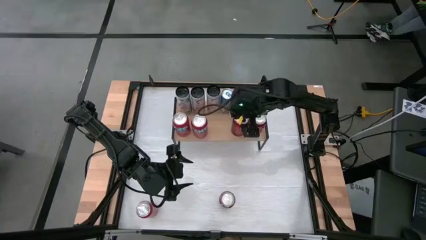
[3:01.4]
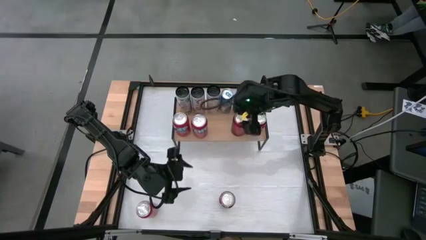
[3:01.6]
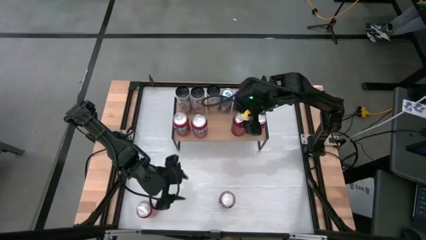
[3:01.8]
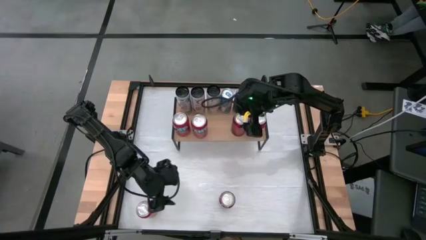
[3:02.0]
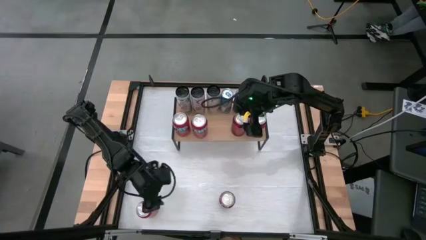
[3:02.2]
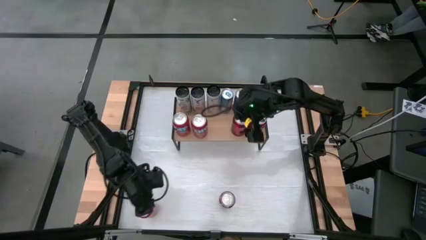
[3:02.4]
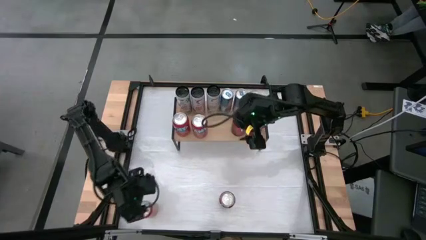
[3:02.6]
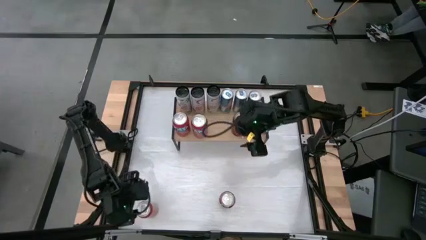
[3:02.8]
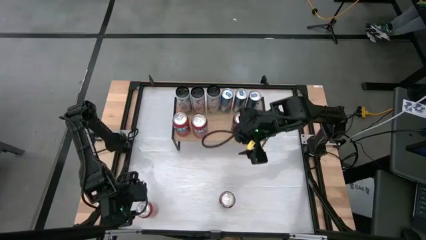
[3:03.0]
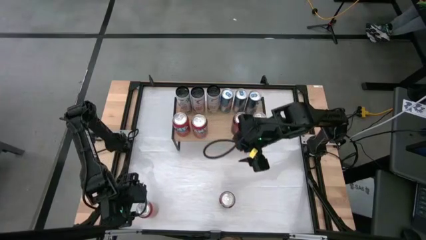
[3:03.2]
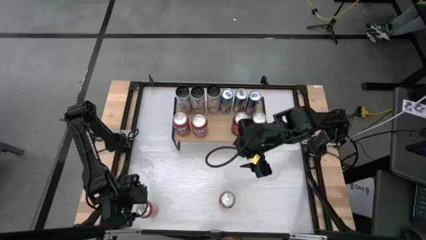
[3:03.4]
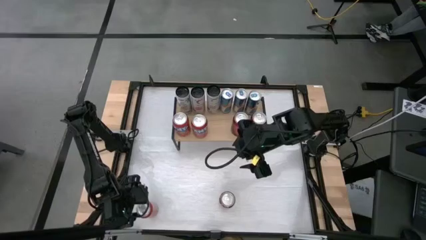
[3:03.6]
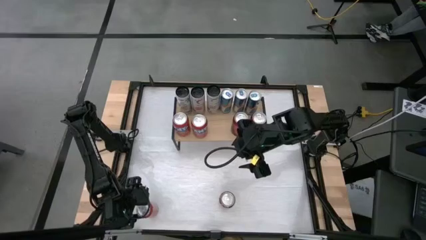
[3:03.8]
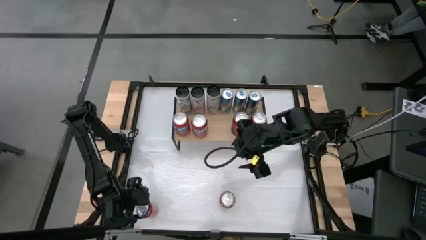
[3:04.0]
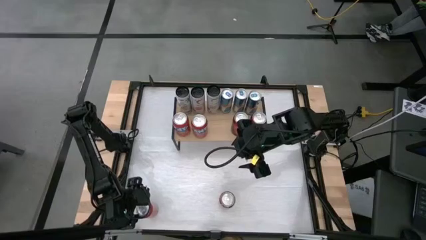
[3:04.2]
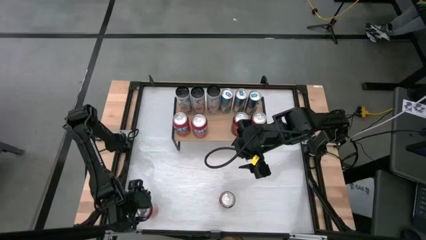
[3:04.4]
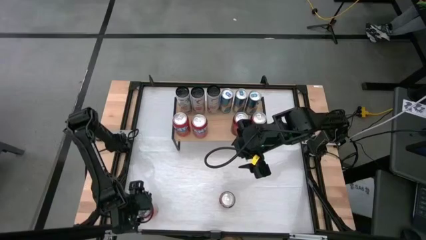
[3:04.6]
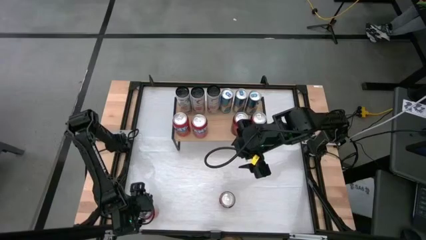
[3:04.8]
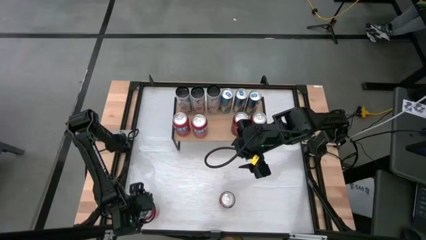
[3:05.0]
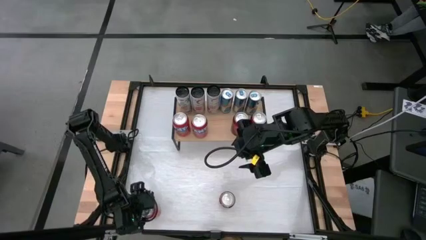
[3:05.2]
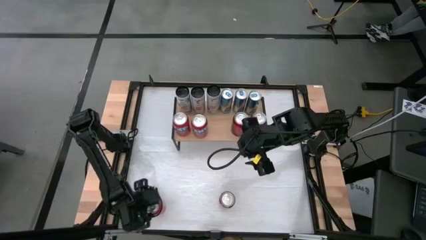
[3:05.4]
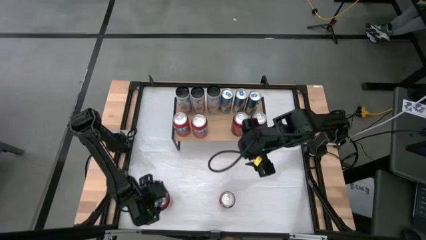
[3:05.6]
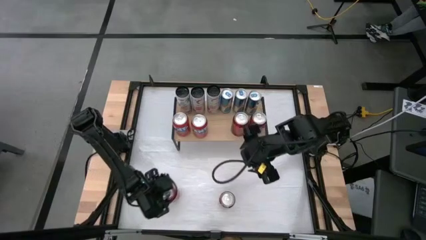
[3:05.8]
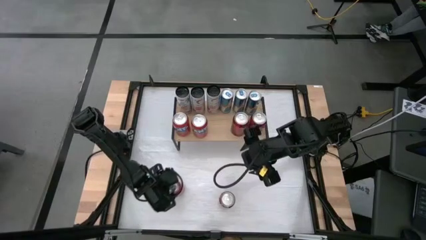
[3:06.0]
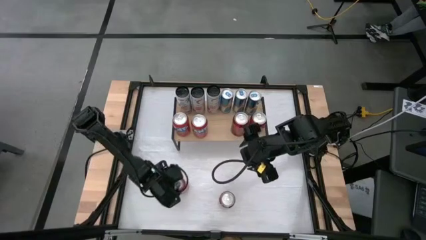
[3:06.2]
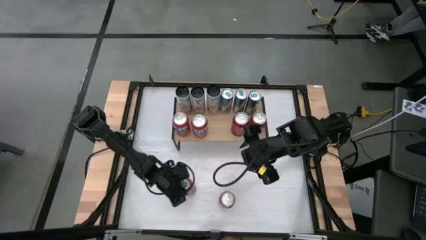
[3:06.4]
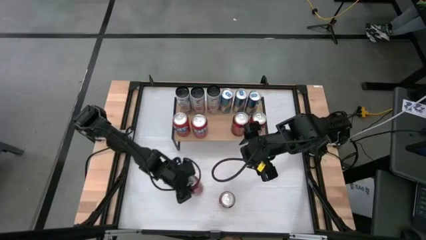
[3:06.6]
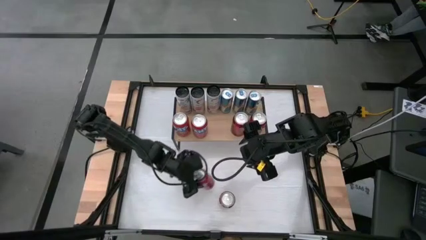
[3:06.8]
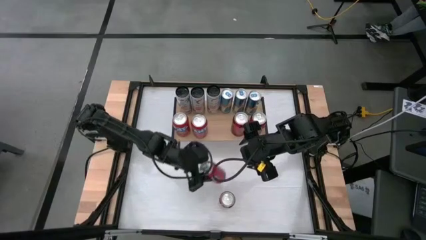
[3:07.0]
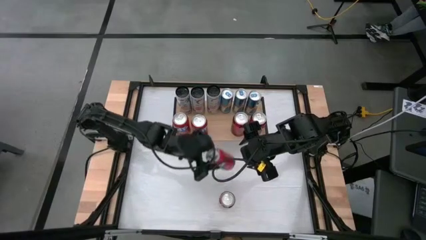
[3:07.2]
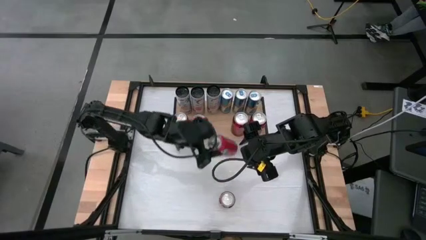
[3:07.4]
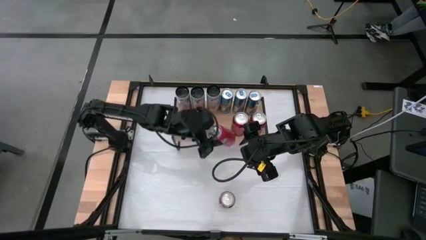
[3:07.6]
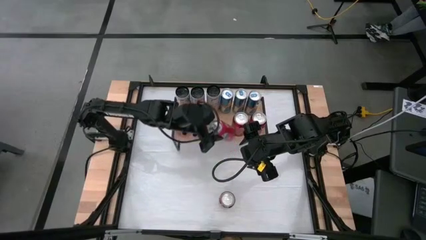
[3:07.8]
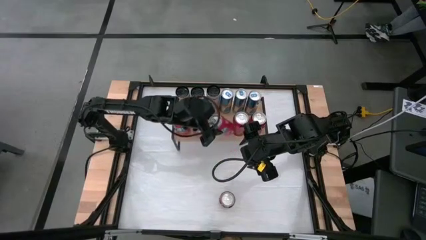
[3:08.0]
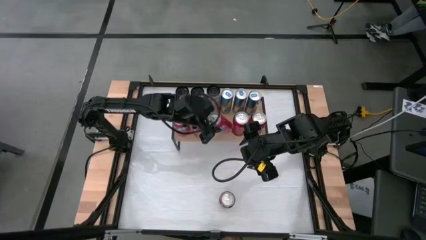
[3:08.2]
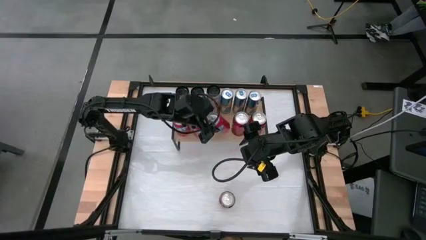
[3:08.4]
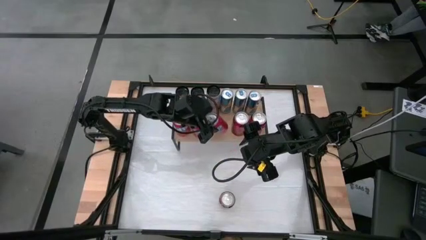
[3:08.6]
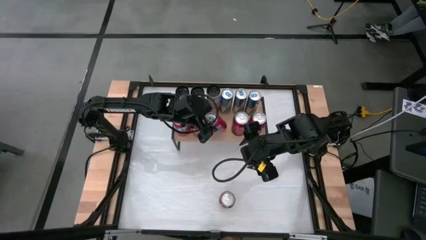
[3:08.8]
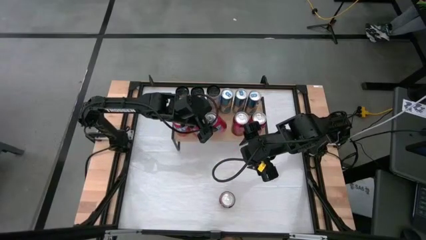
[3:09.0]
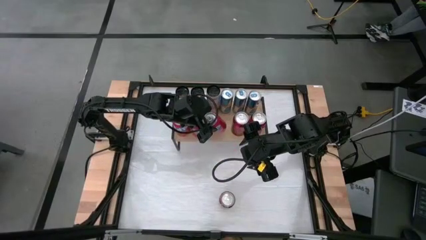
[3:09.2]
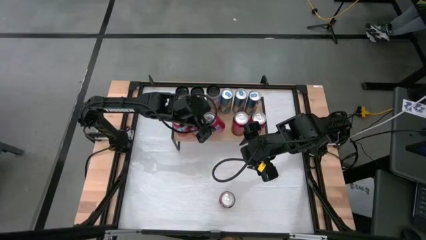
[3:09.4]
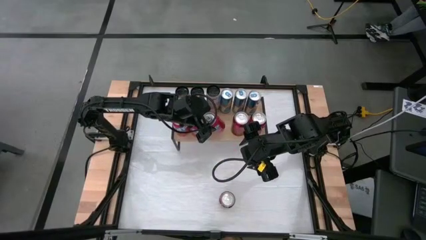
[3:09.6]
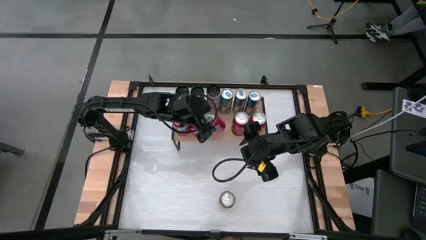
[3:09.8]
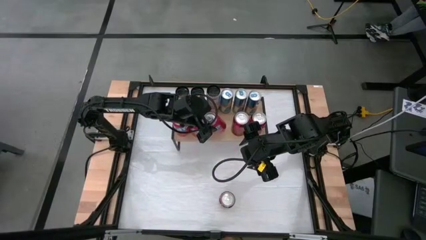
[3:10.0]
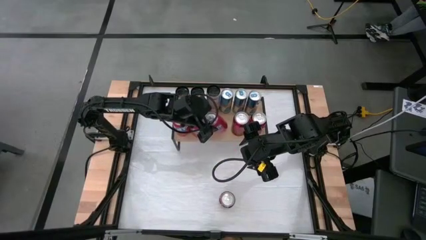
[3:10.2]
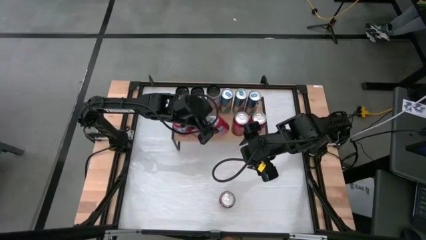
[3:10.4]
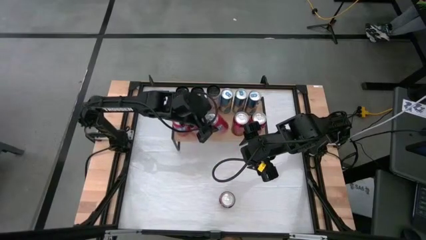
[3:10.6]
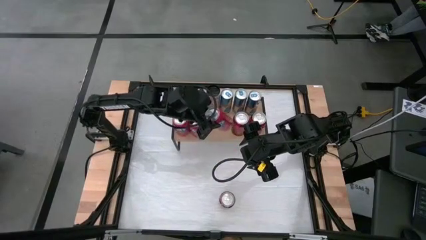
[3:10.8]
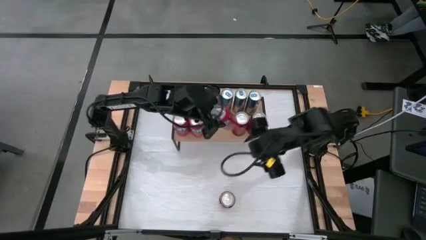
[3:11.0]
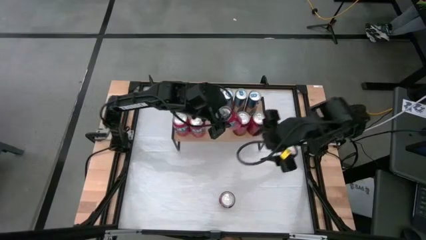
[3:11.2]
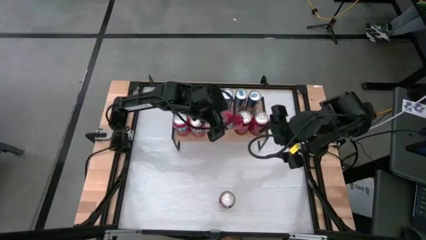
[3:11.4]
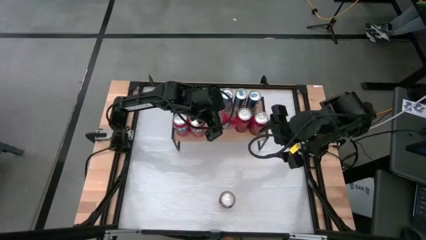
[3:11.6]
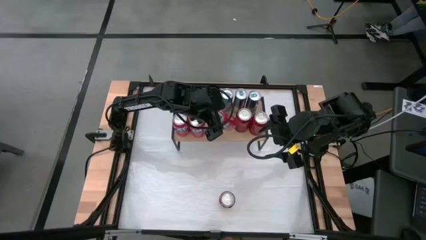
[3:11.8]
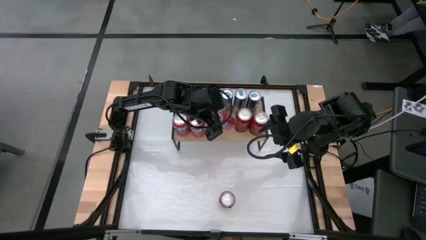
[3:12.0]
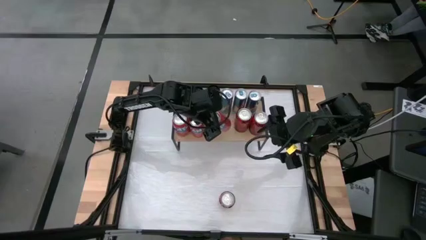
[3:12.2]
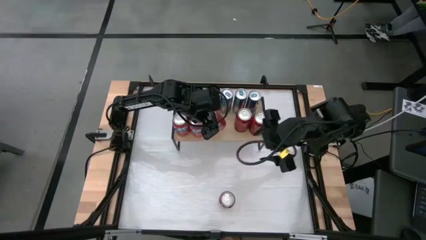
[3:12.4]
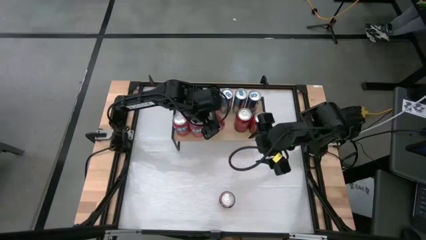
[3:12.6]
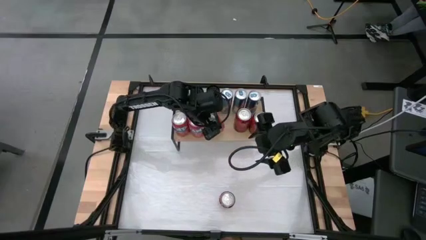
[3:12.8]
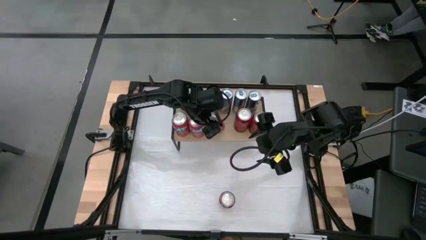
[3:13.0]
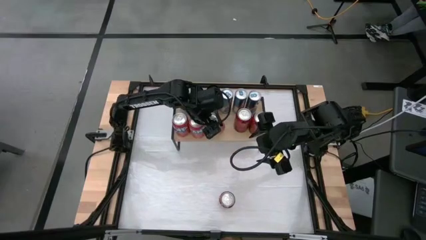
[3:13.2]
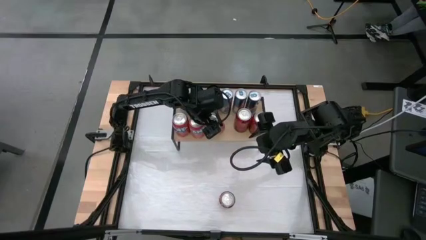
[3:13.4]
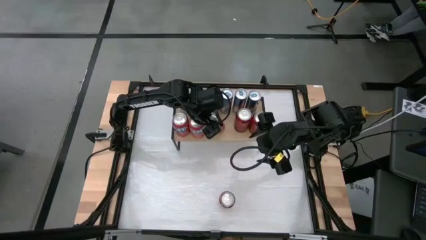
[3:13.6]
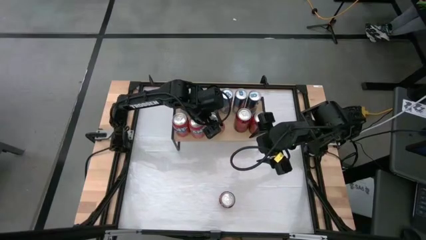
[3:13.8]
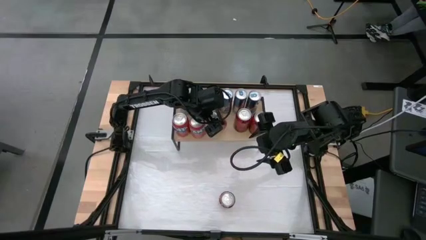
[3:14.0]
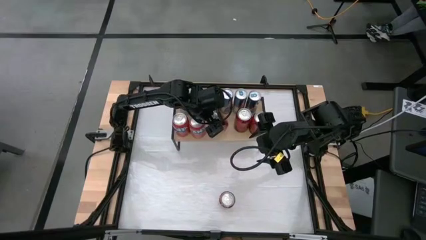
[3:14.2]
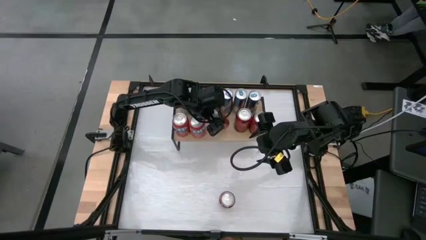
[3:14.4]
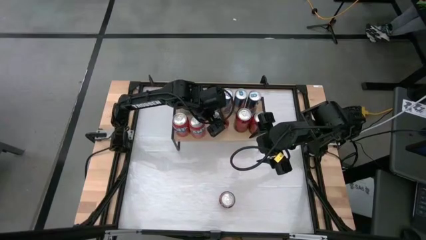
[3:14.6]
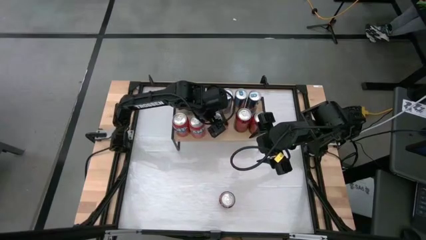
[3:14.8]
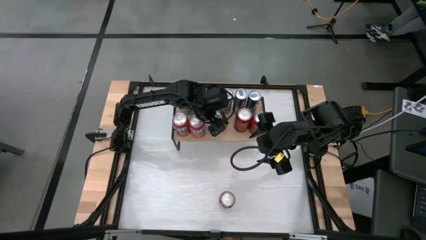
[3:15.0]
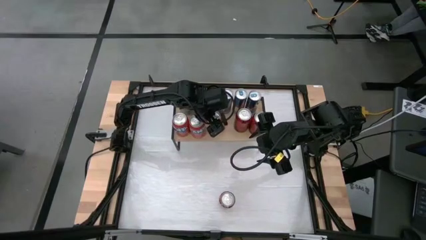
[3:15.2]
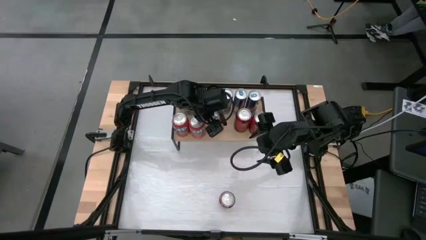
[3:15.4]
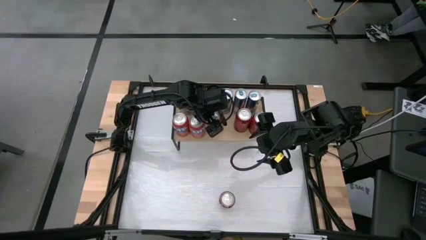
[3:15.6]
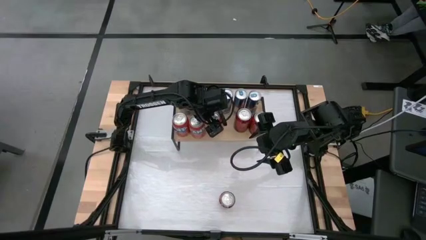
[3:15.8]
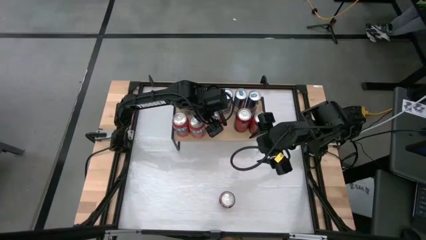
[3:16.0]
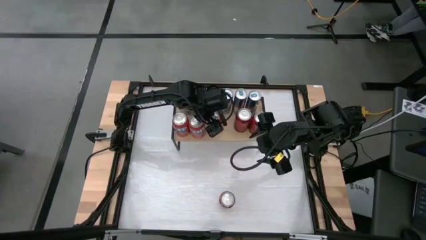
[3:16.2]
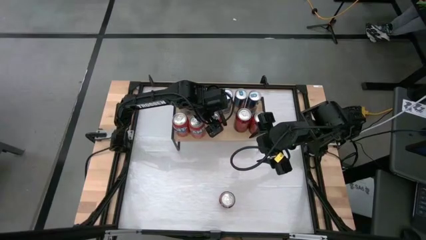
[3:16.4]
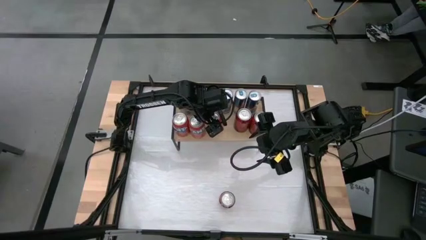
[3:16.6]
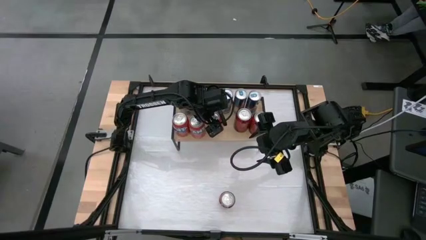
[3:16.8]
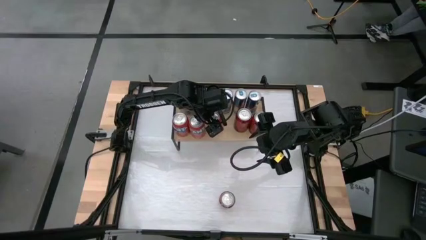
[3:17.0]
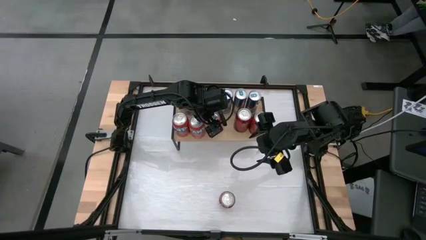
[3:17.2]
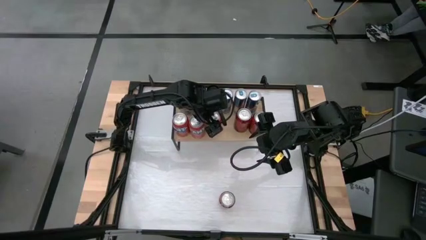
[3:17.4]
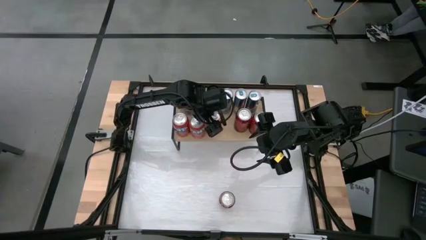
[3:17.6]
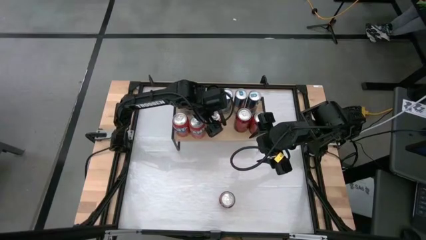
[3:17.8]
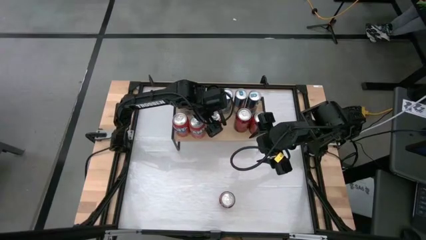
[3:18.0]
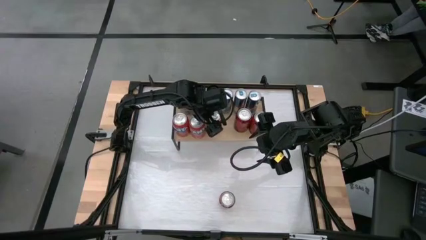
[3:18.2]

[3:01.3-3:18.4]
Task: Place canned beverage on shelf
Put the orange soda can on the shelf aligned with the white soda can
